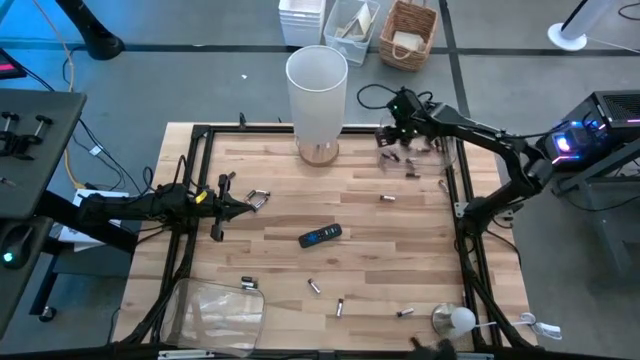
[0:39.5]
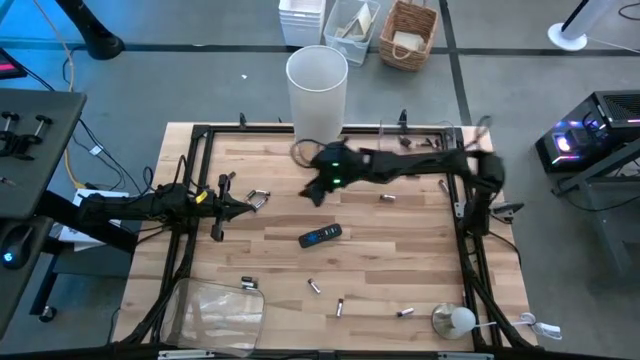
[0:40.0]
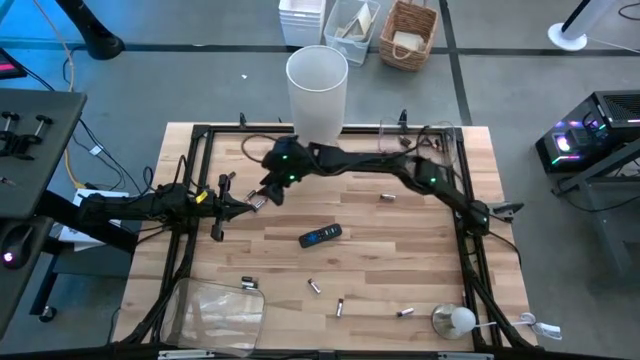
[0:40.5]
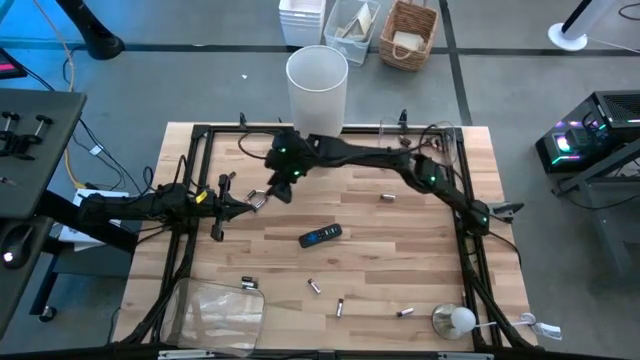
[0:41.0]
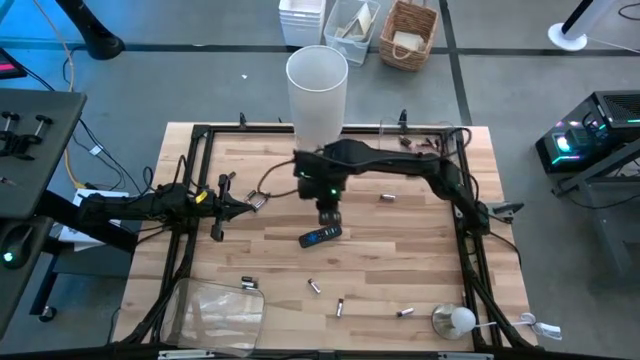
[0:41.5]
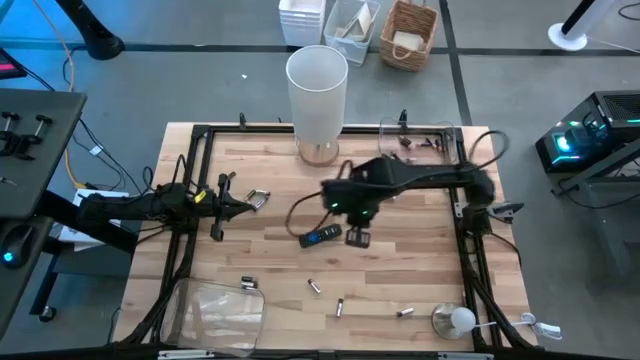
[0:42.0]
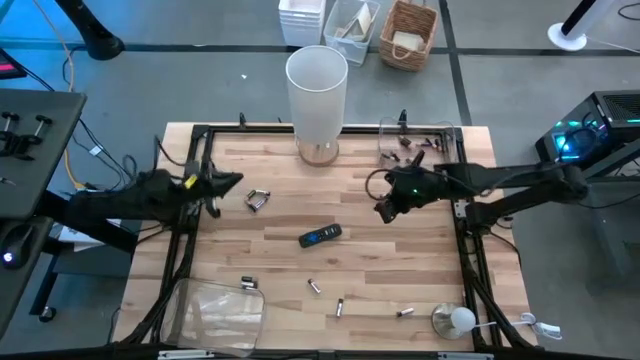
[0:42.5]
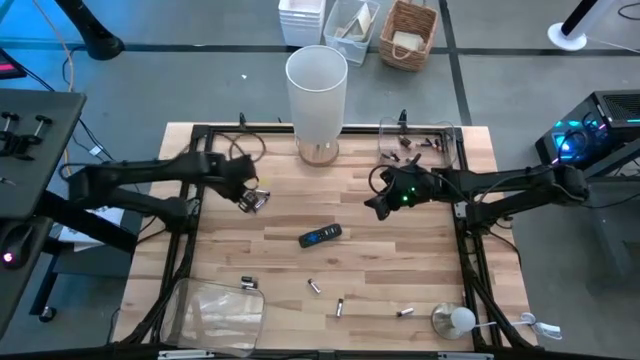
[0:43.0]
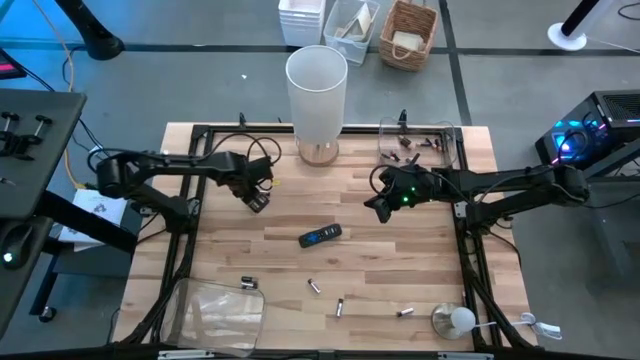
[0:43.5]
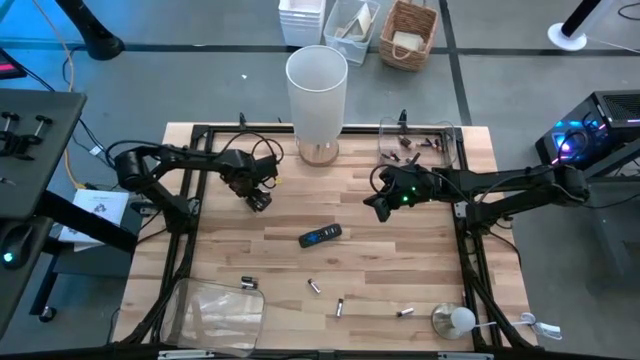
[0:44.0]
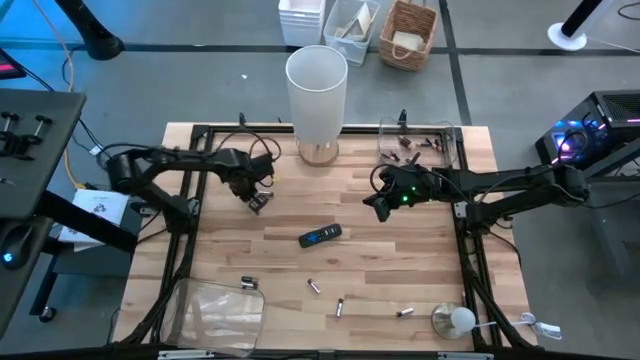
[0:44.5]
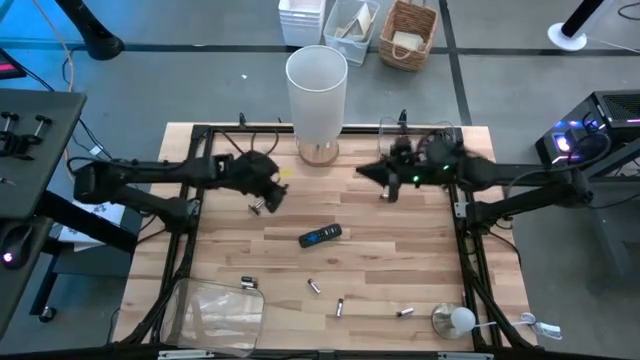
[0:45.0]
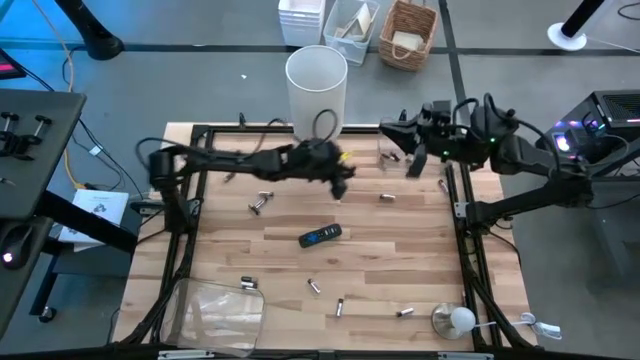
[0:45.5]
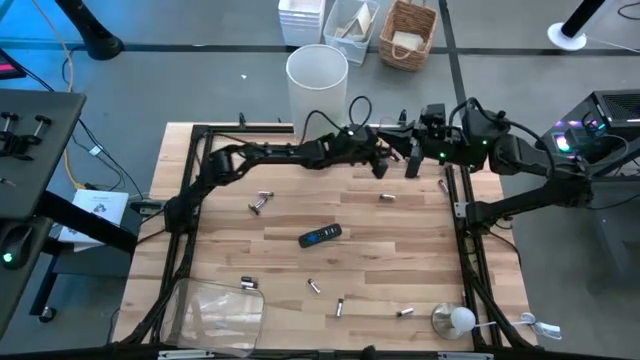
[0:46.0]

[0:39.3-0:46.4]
Task: Sort batteries
Put the black battery into the top transparent bin

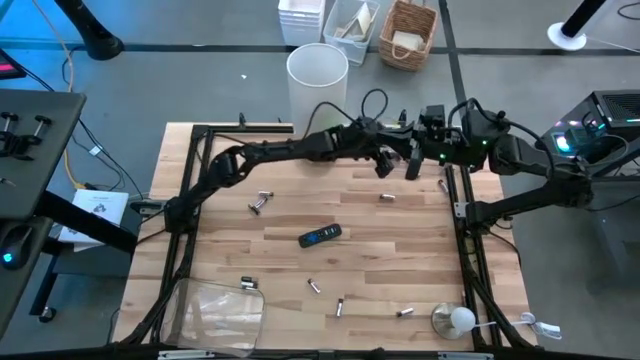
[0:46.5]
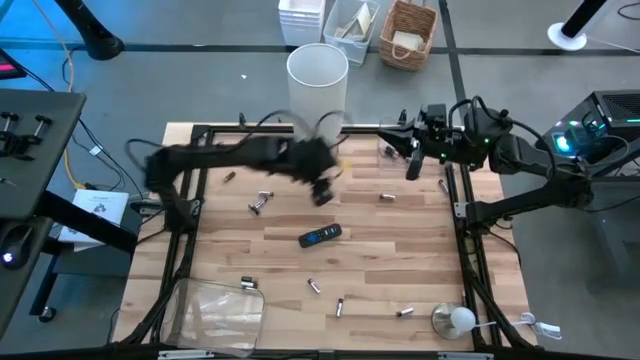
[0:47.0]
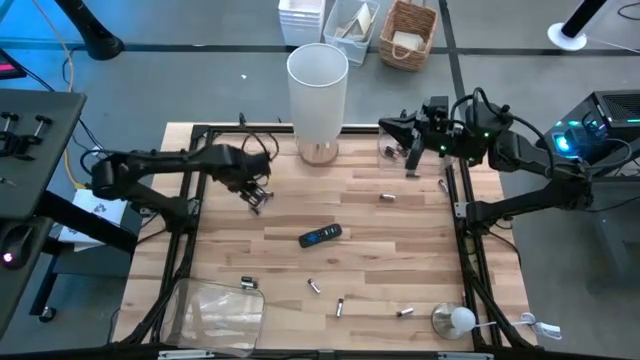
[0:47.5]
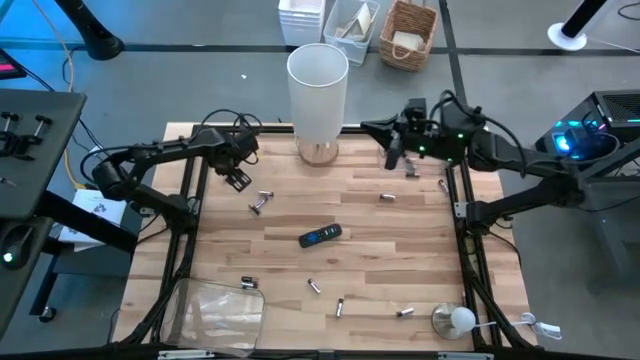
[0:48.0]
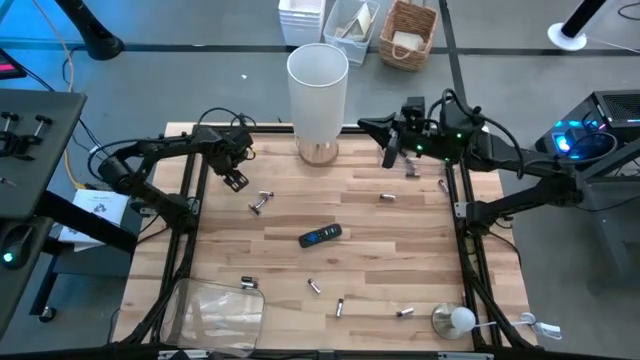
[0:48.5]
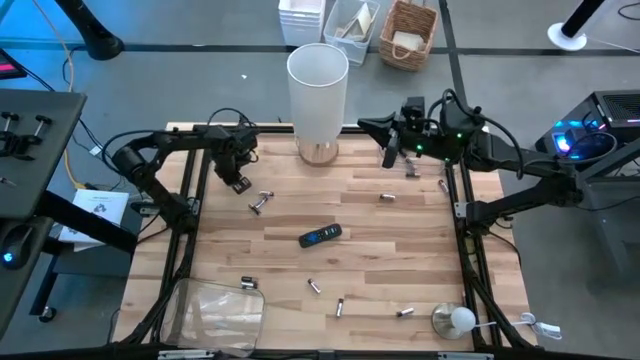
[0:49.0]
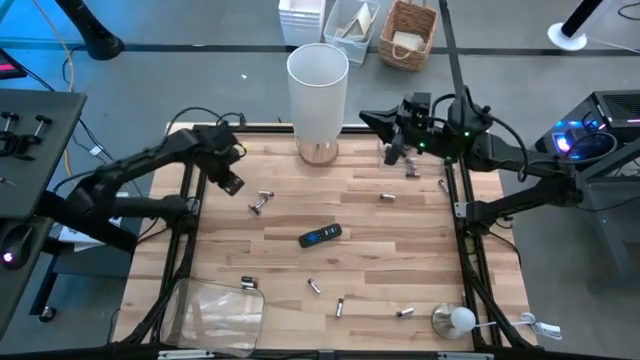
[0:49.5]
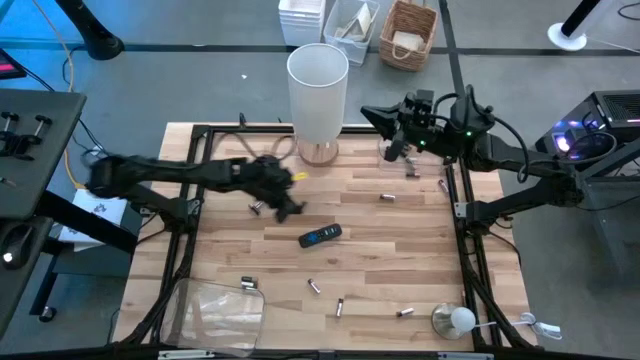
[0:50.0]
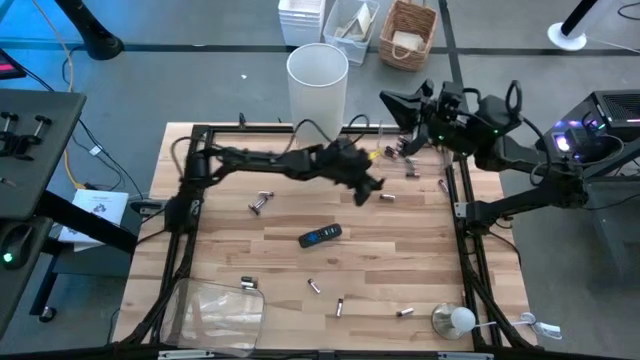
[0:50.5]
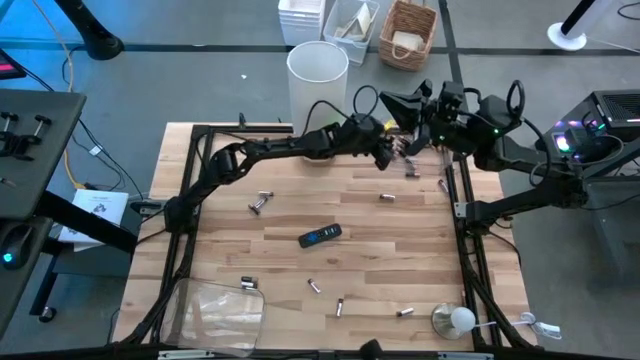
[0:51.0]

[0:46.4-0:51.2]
Put the black battery into the top transparent bin

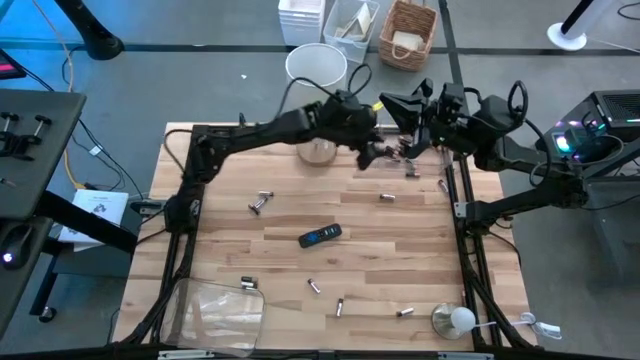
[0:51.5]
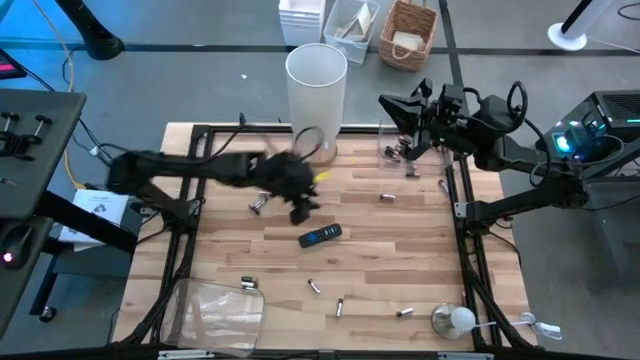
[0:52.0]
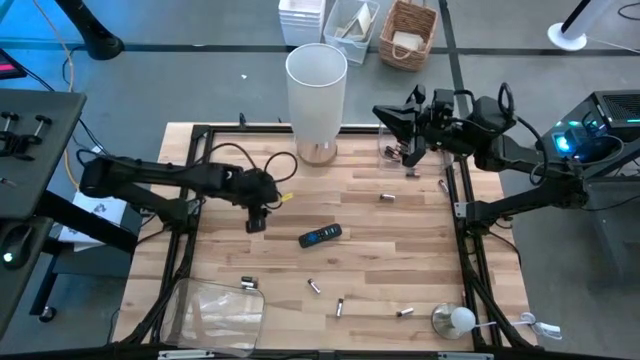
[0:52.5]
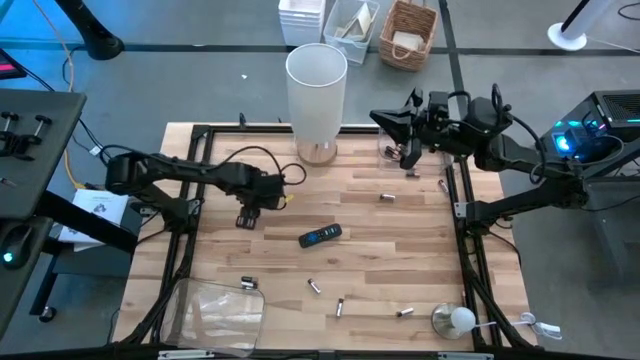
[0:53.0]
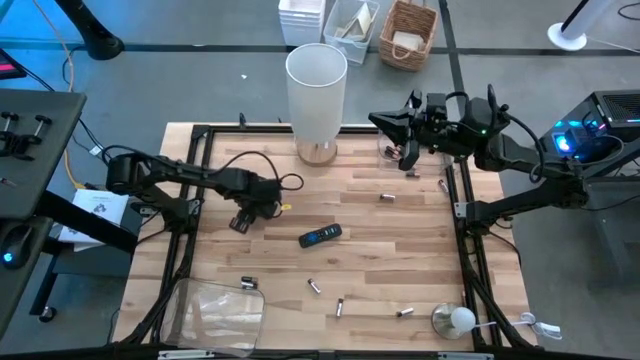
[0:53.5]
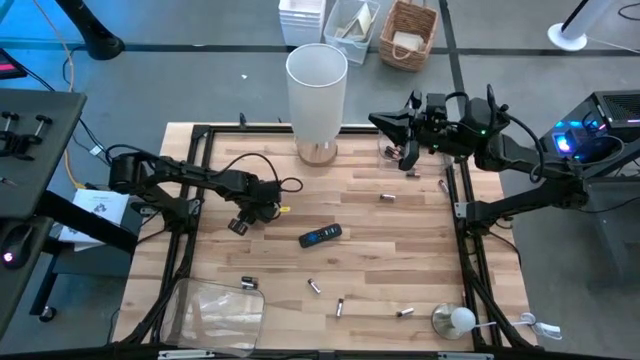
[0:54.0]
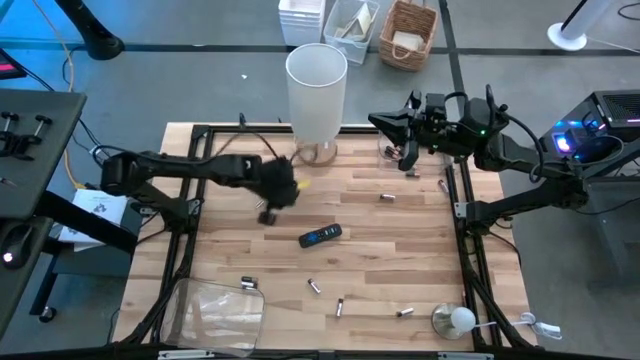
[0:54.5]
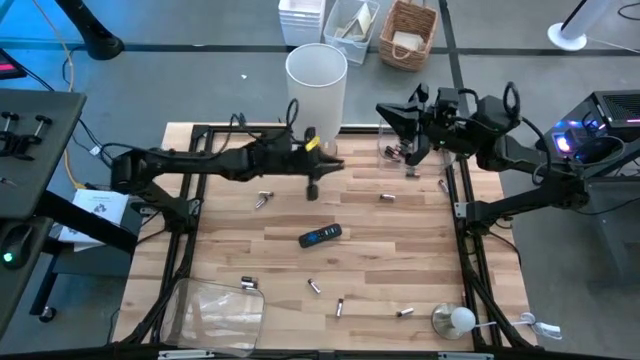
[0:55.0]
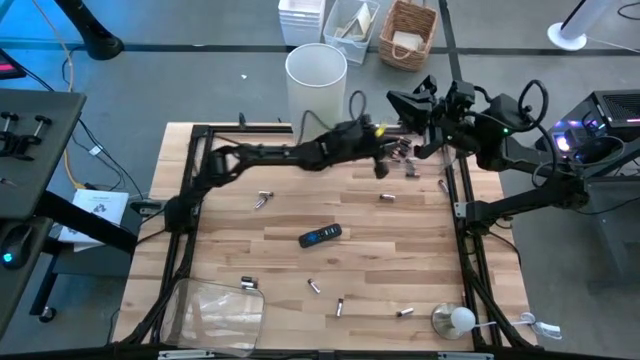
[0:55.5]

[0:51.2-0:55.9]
Put the black battery into the top transparent bin

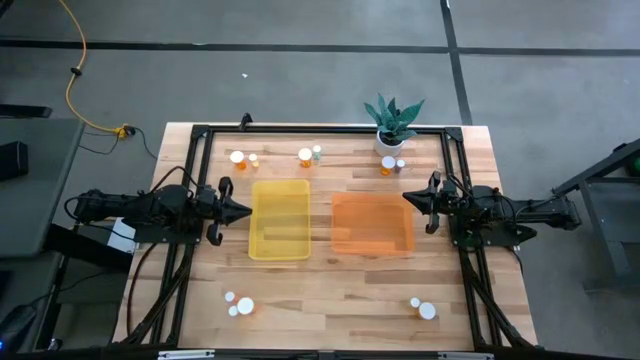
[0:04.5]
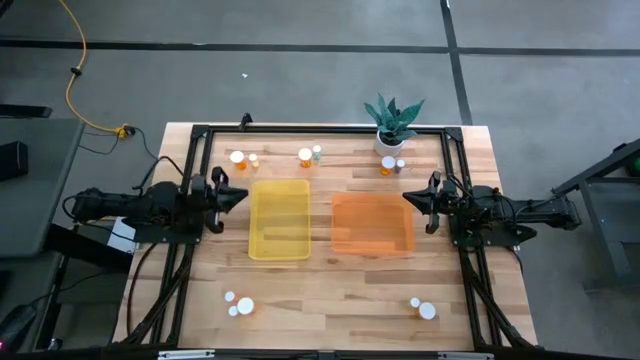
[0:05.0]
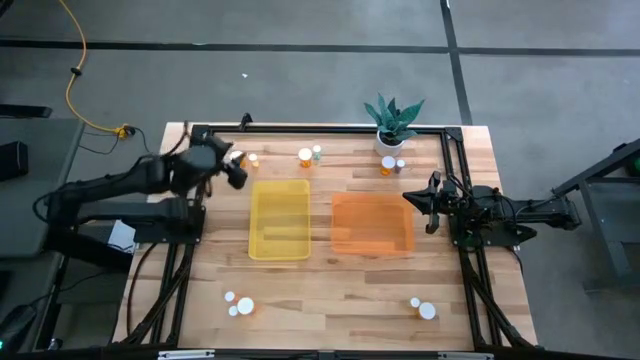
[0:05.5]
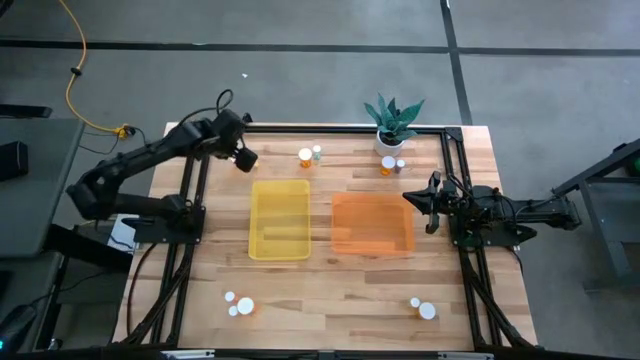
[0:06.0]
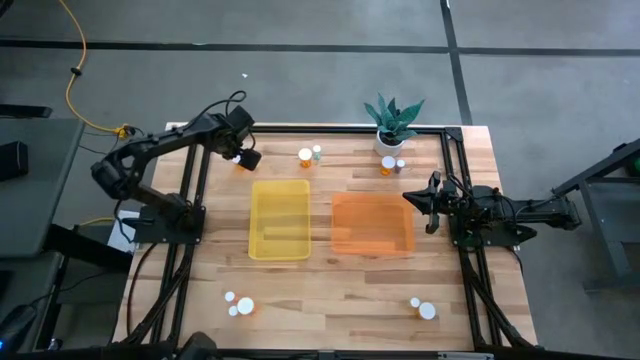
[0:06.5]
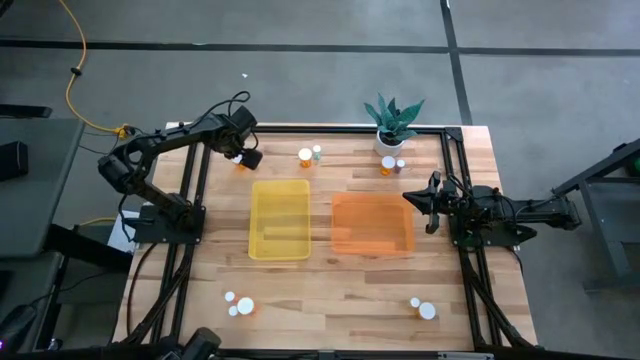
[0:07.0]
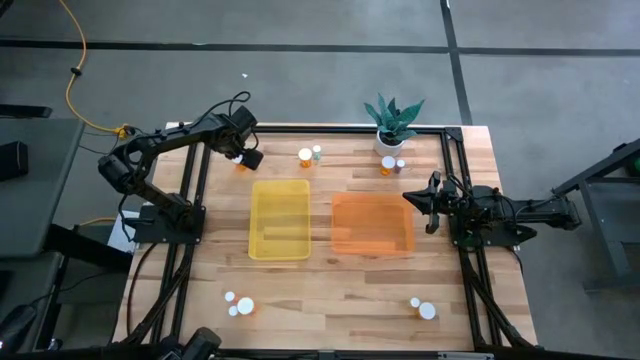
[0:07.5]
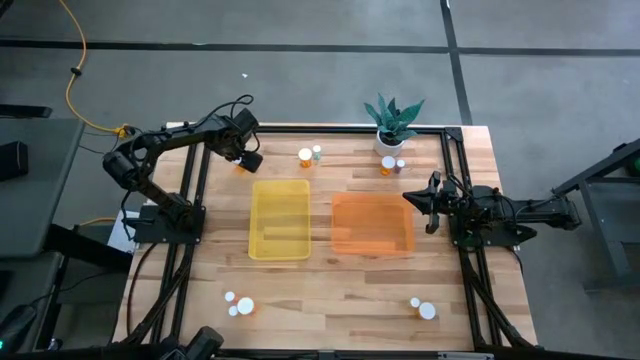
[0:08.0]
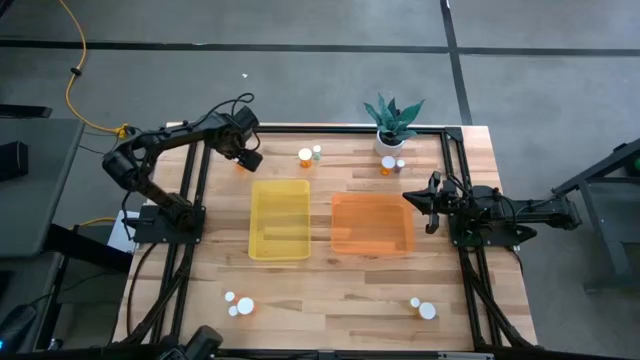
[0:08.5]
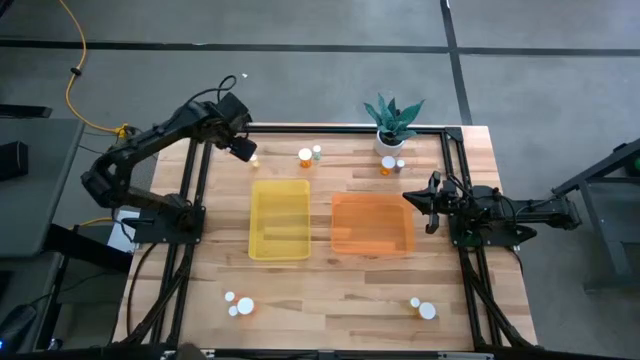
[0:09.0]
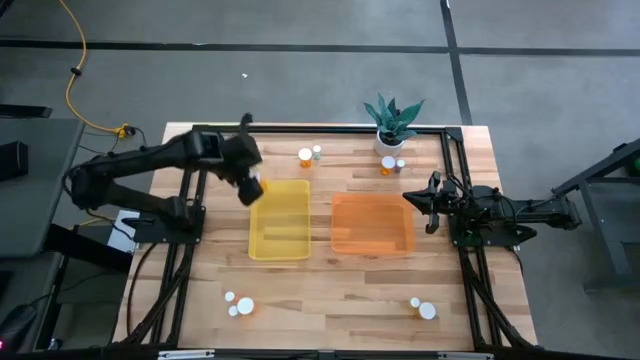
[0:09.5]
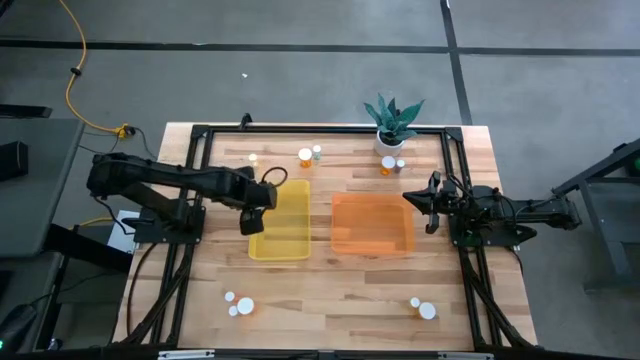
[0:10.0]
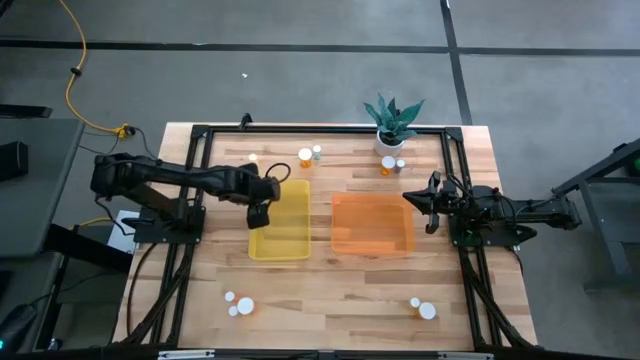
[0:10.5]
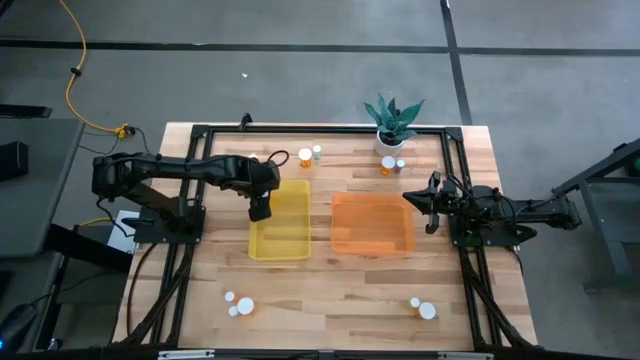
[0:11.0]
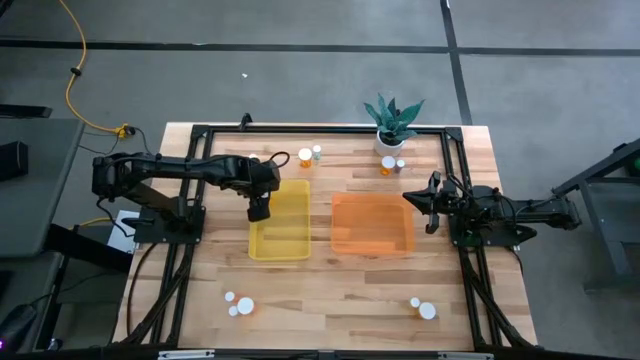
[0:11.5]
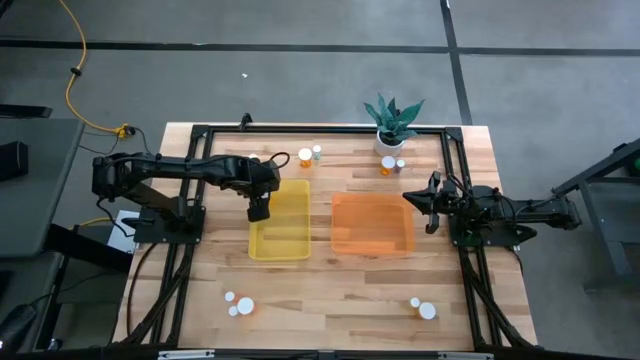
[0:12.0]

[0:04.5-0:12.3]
Task: Pick and place medicine bottles into bin by pill shape (circle, oval)
Put the large orange capsule bottle into the yellow bin
